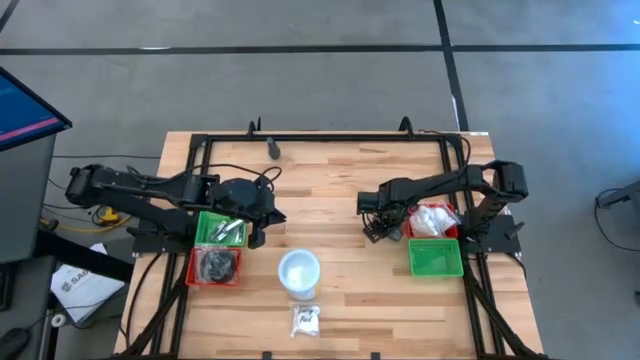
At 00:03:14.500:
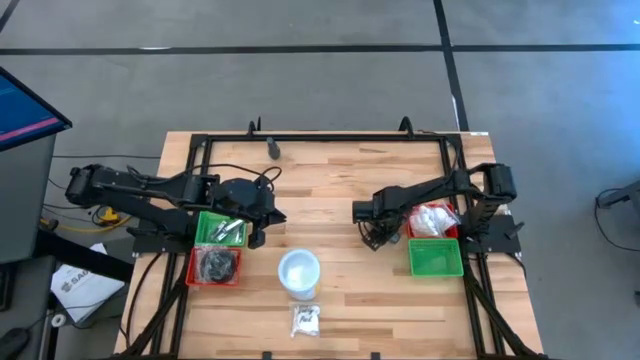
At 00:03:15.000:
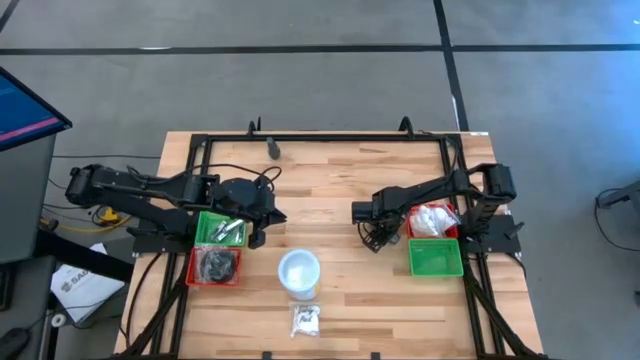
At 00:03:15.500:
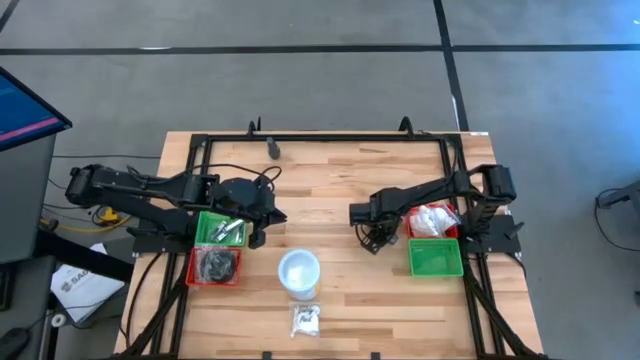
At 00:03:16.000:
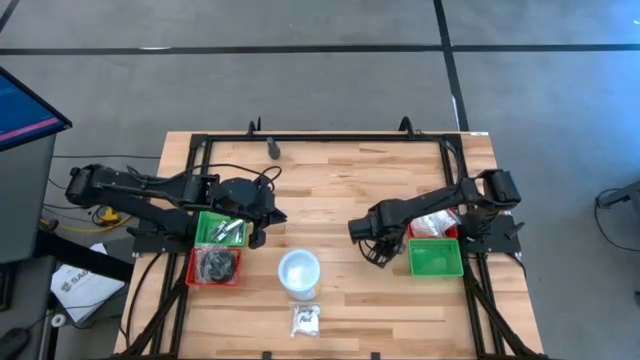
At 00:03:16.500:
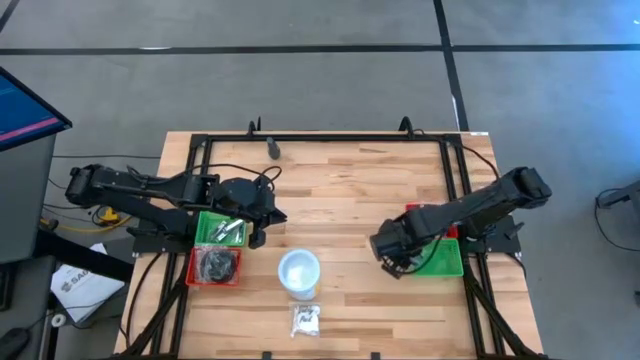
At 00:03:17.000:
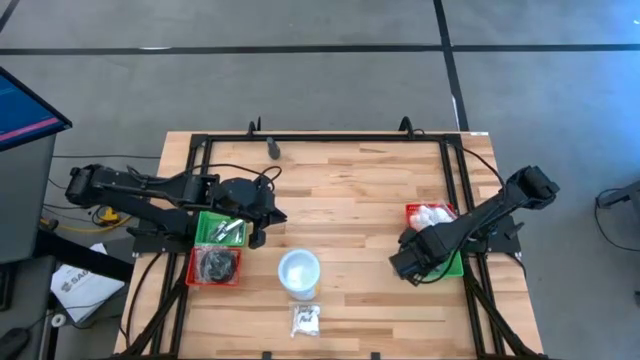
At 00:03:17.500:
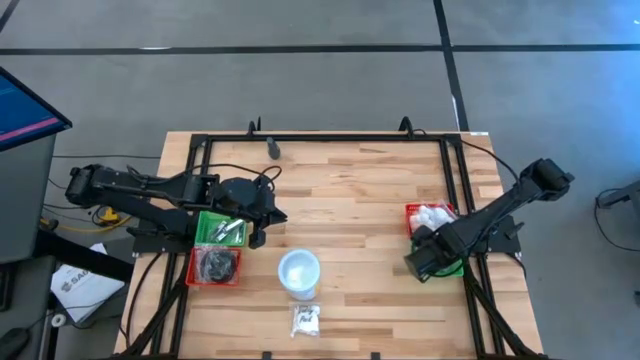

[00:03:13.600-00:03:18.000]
Task: Pick & Place Travel size toiletries
Put the bottom gray deodorant into the right green bin

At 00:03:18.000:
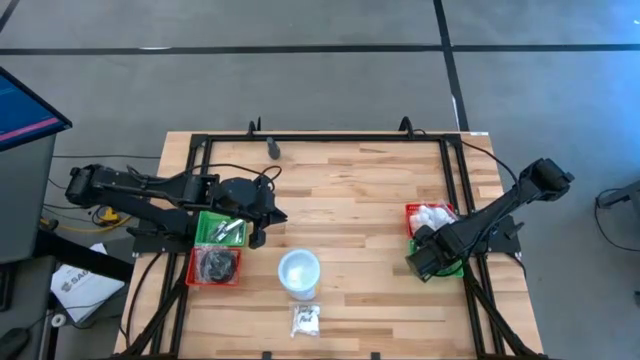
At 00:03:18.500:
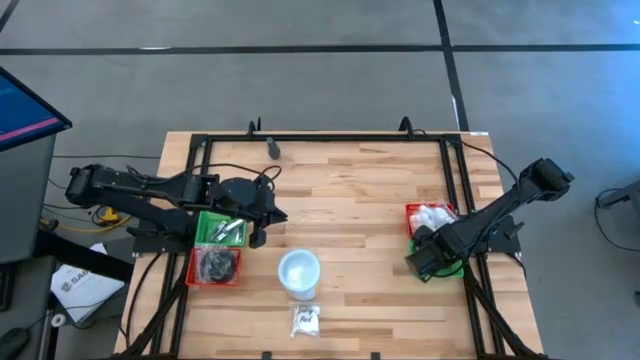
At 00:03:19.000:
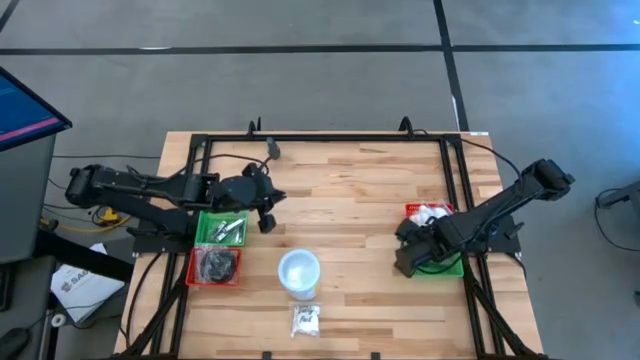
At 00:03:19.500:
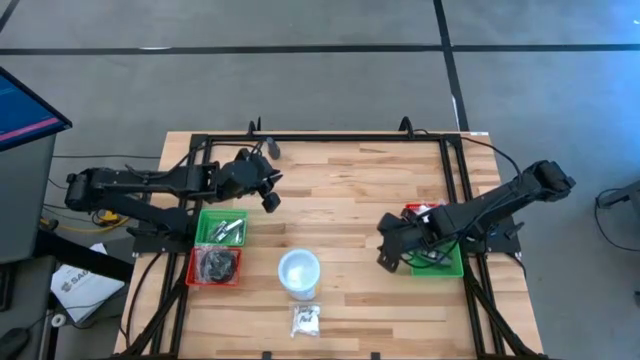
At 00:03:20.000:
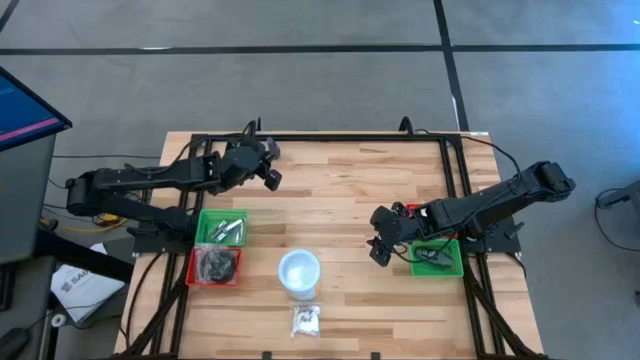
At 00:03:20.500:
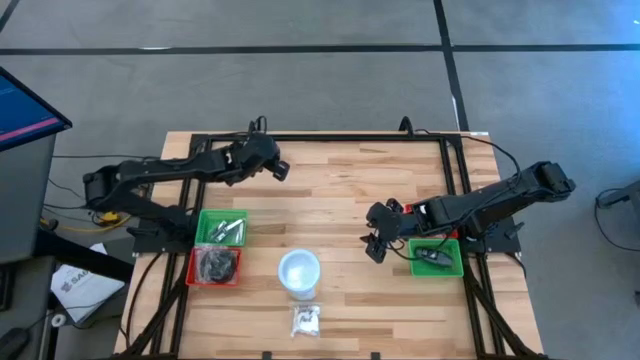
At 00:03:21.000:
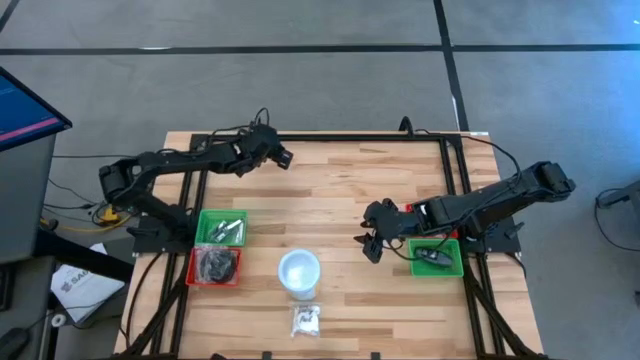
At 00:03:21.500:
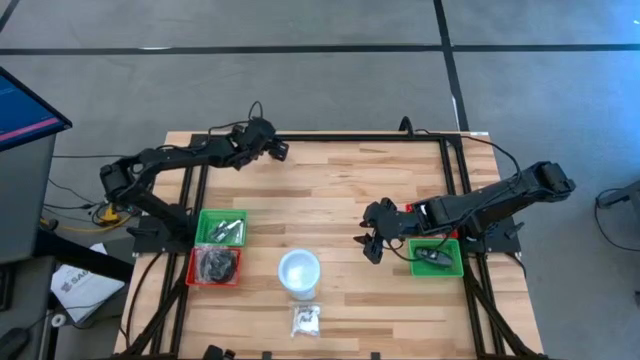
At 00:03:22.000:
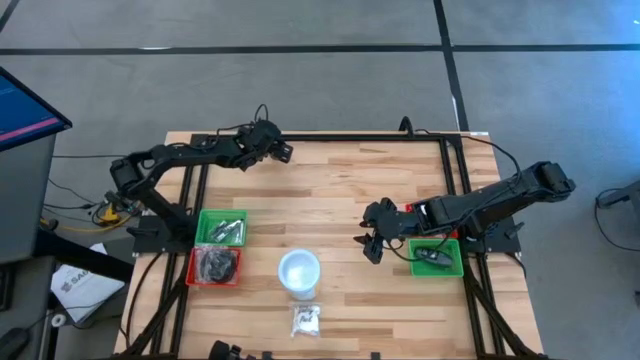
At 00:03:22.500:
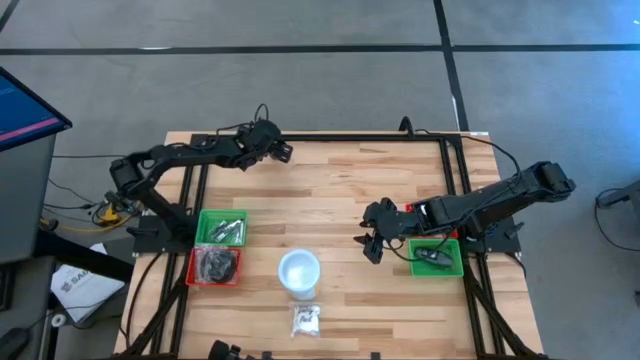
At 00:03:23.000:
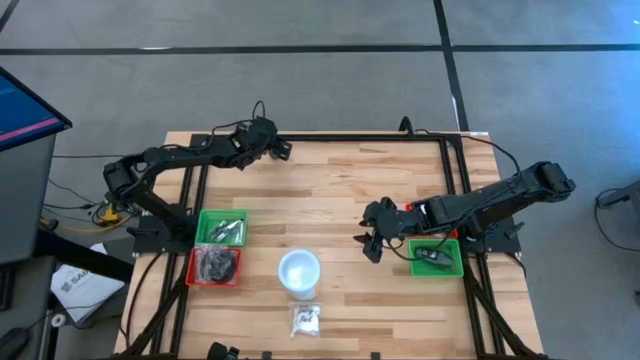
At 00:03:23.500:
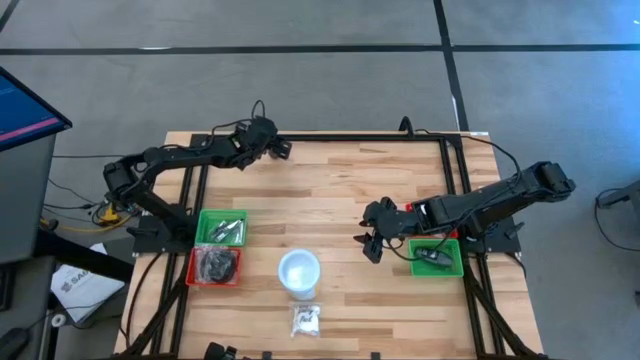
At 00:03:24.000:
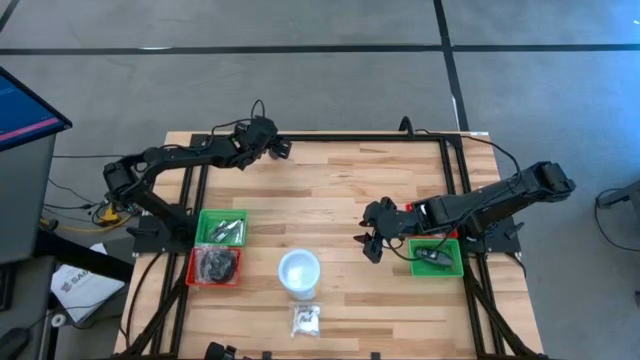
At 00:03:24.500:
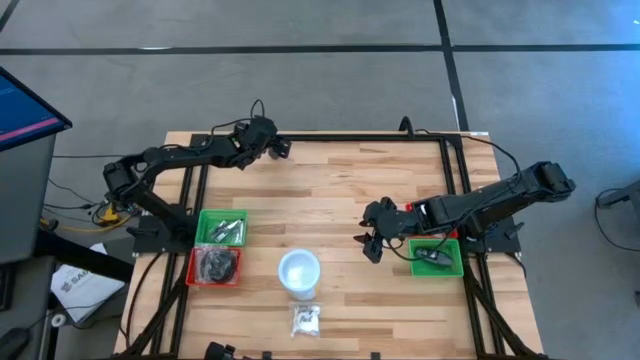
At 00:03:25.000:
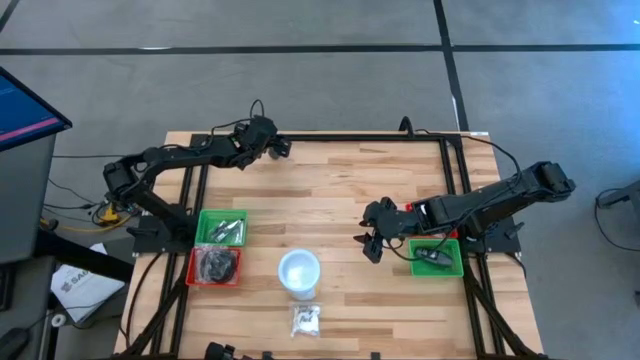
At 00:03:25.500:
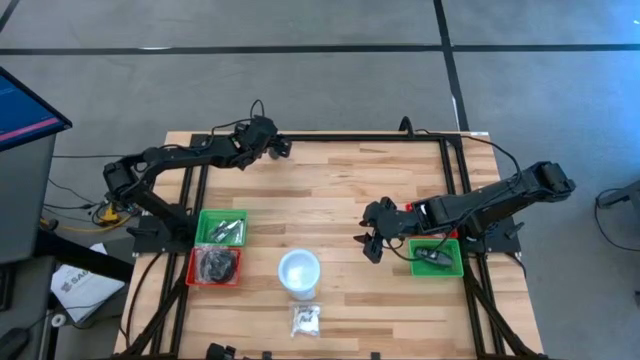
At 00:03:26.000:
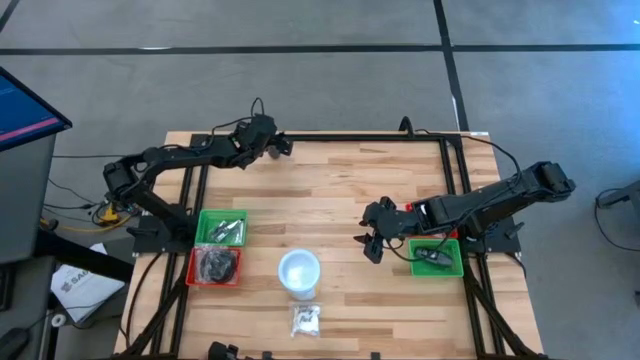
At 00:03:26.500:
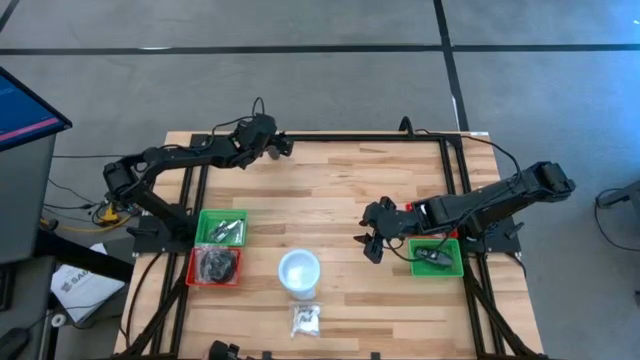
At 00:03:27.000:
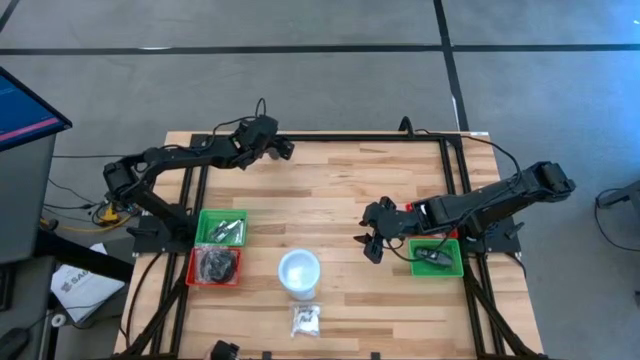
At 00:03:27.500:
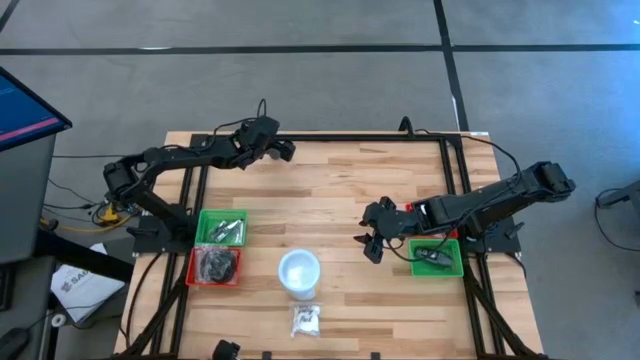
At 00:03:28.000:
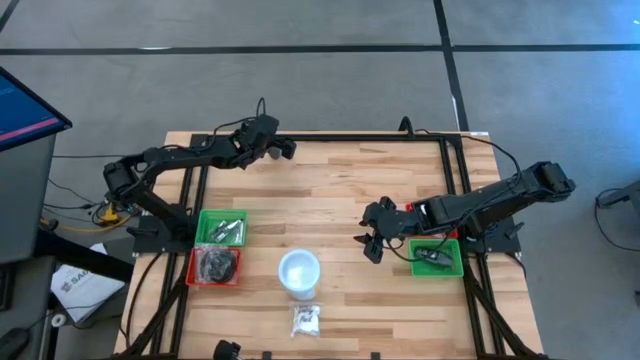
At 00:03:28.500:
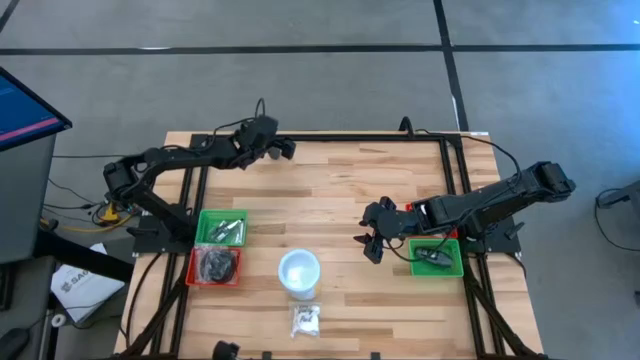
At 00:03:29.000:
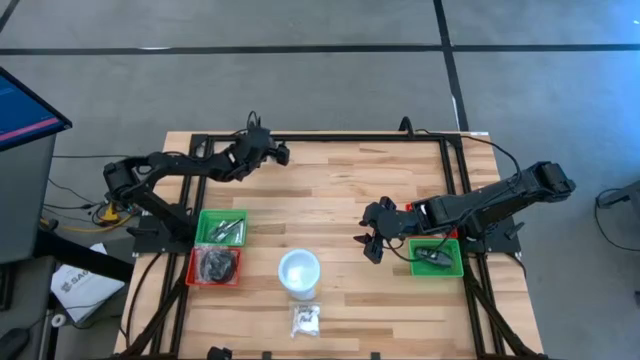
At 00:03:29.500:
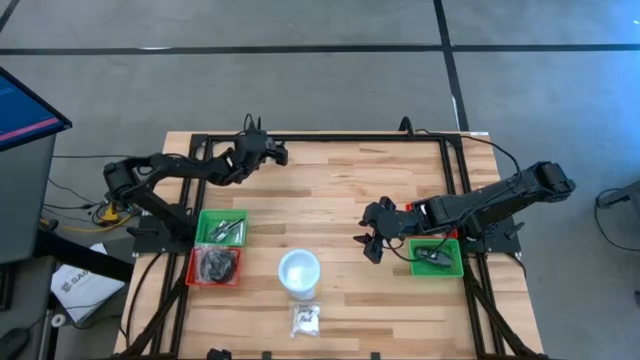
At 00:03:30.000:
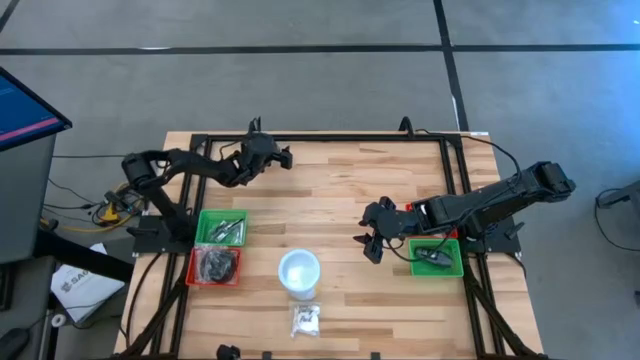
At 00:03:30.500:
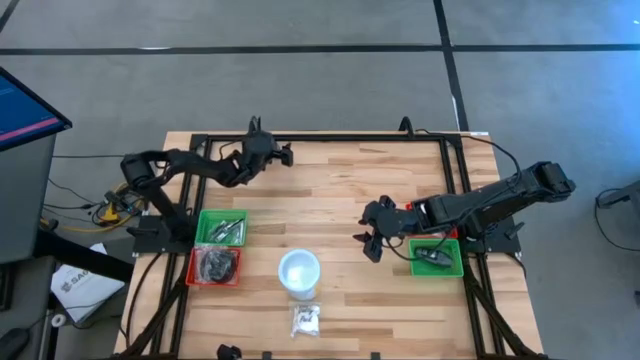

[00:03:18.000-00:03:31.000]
Put the bottom gray deodorant into the right green bin

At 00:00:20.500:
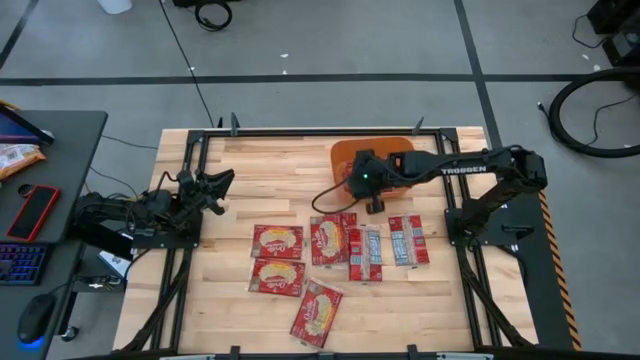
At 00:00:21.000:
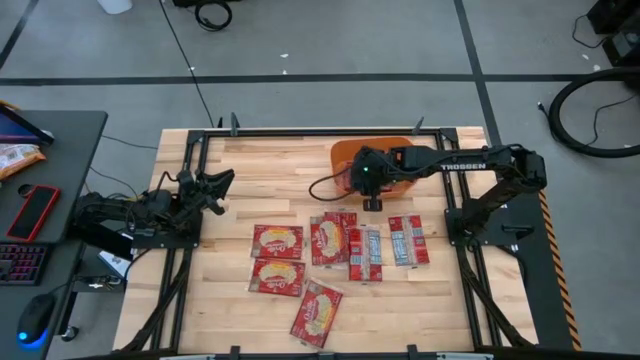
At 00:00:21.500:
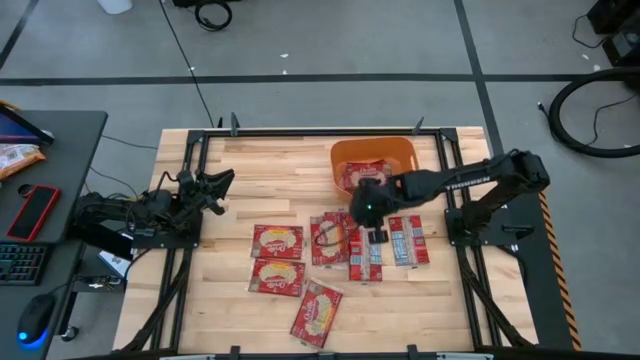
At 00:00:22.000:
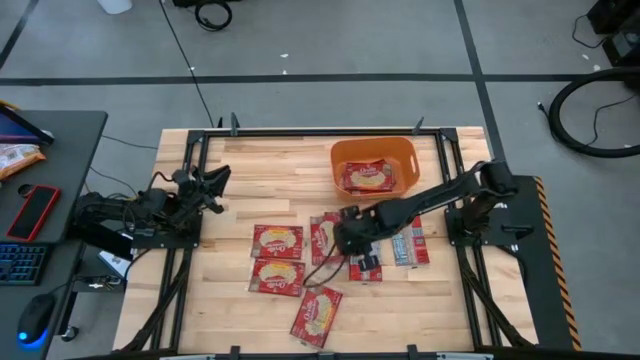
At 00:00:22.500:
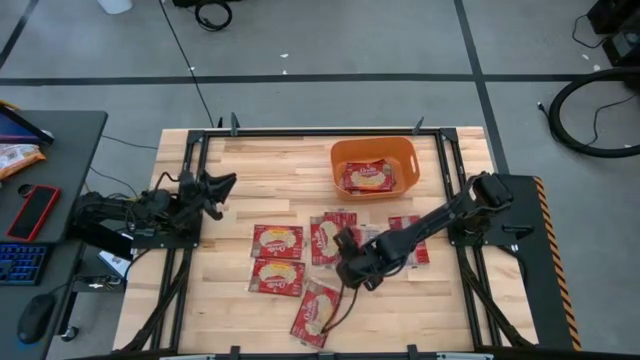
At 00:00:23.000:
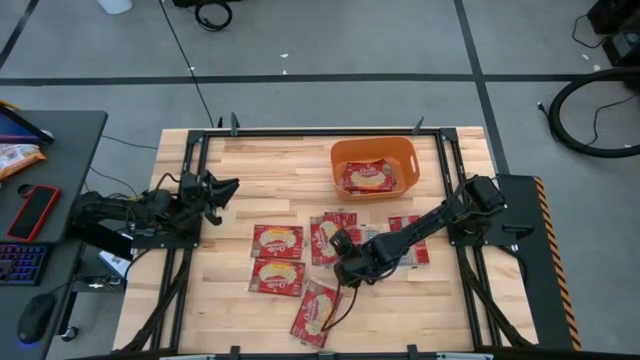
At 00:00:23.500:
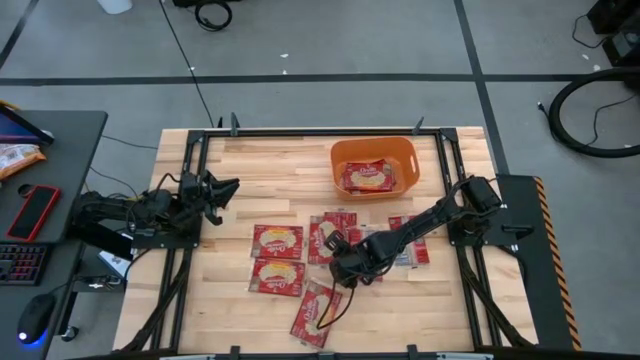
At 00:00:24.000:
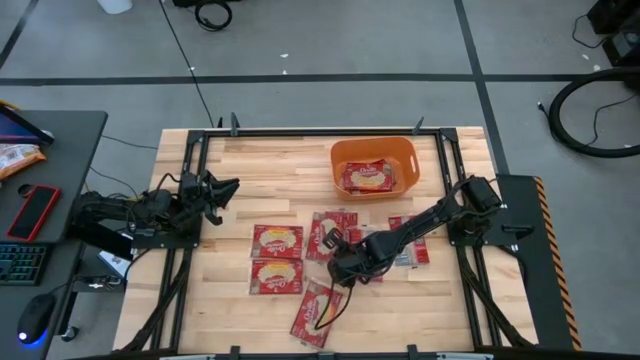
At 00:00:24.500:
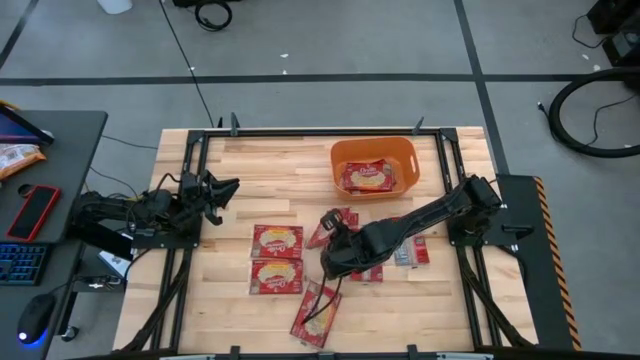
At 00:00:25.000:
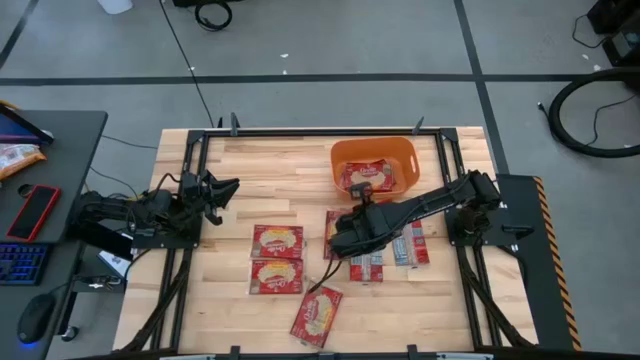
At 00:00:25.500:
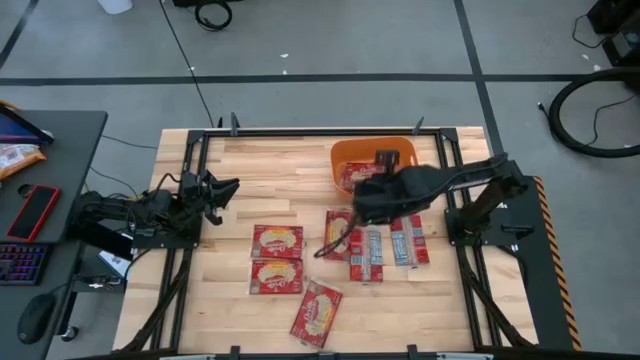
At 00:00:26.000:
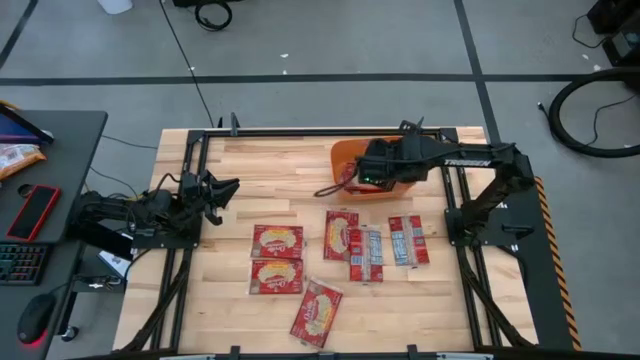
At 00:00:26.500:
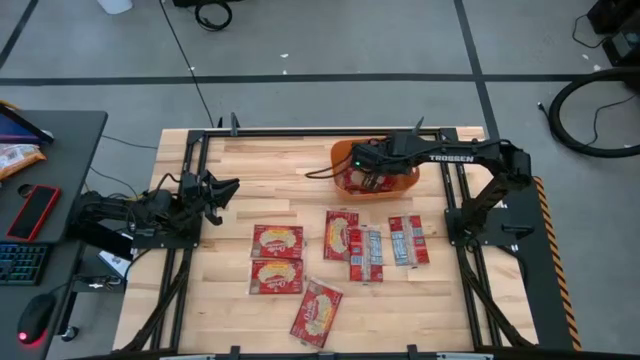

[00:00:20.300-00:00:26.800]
Task: Sort popcorn bags into baskets
Stack the popcorn bag on top of the other popcorn bag into the orange container
